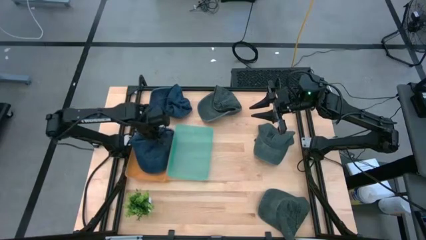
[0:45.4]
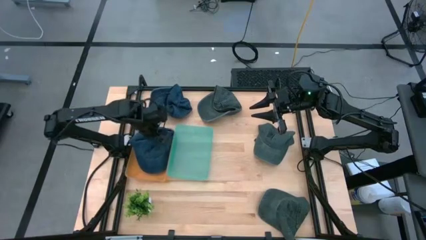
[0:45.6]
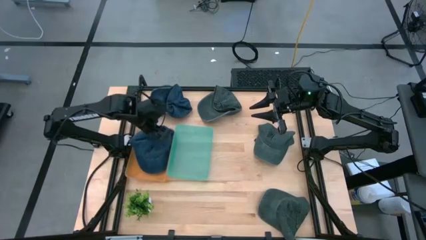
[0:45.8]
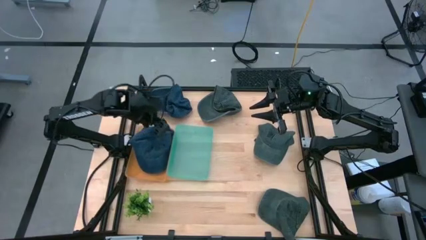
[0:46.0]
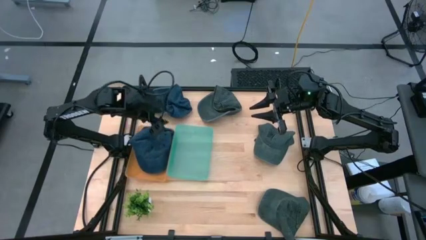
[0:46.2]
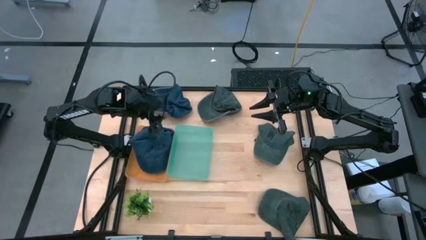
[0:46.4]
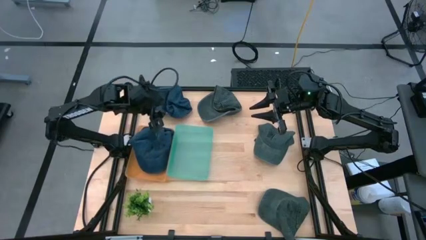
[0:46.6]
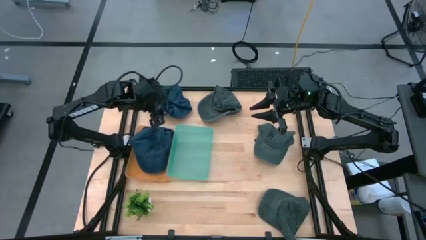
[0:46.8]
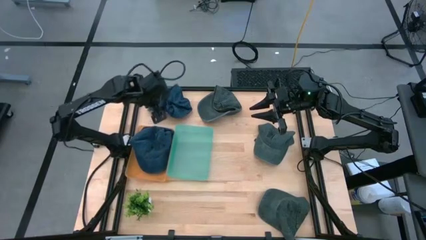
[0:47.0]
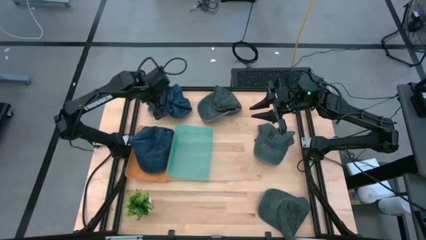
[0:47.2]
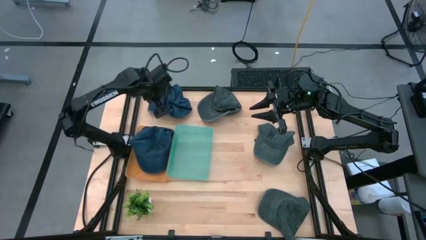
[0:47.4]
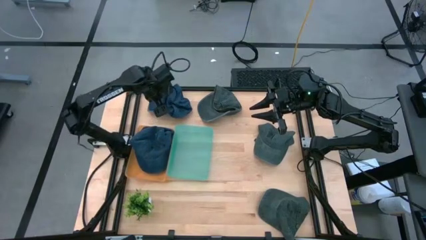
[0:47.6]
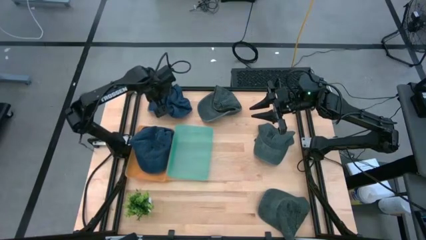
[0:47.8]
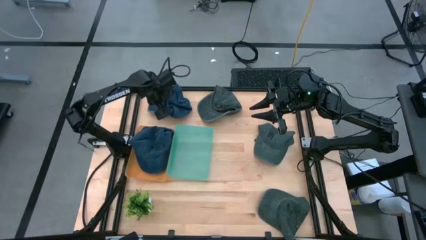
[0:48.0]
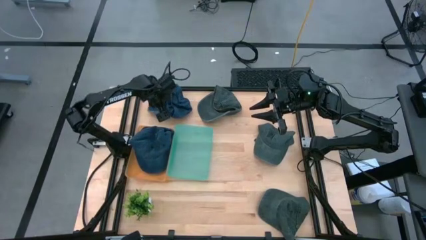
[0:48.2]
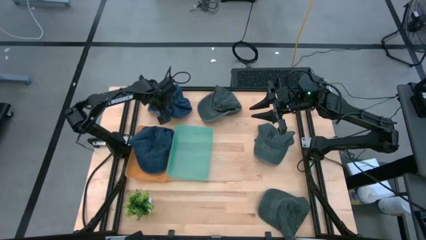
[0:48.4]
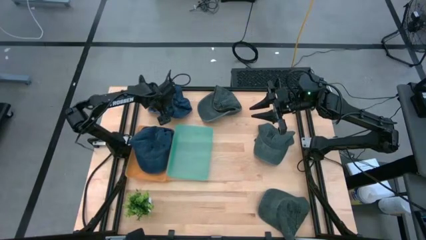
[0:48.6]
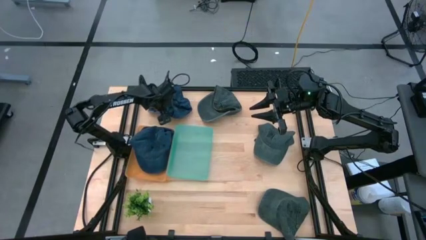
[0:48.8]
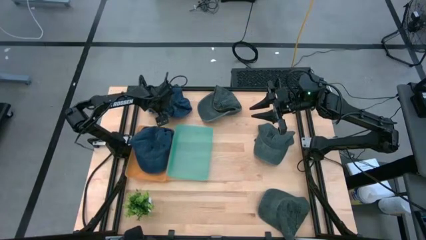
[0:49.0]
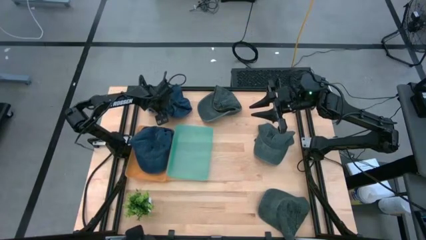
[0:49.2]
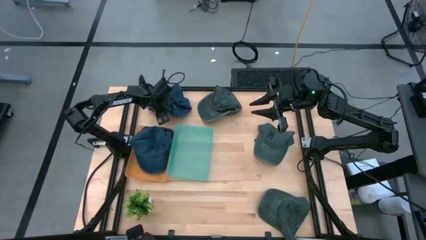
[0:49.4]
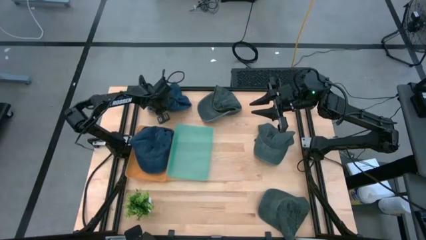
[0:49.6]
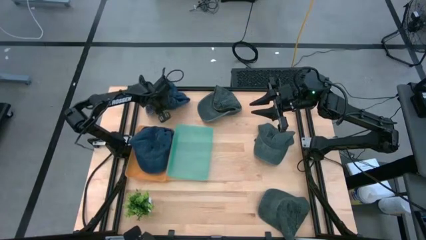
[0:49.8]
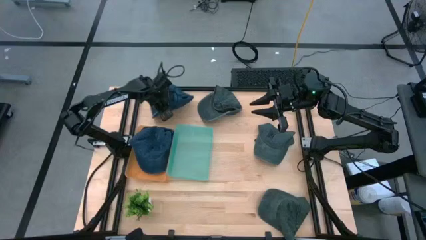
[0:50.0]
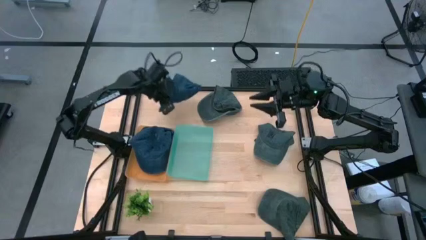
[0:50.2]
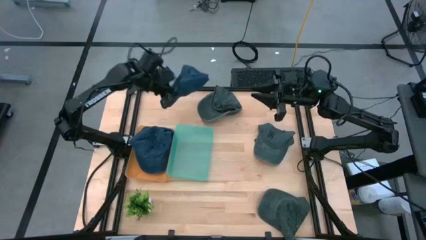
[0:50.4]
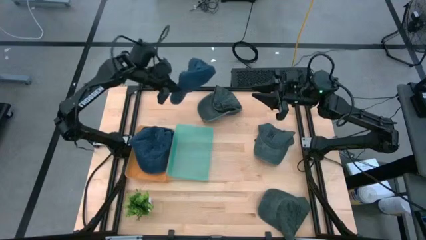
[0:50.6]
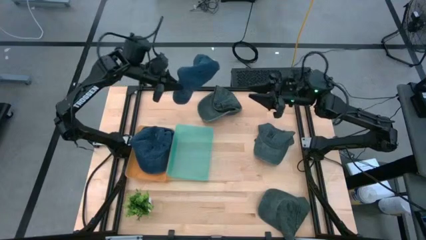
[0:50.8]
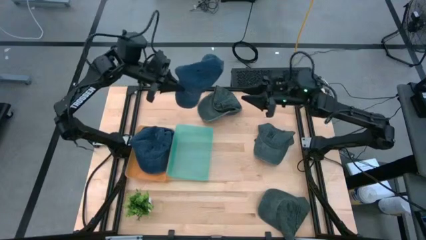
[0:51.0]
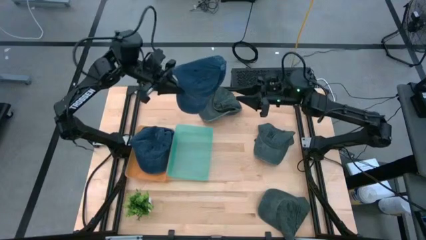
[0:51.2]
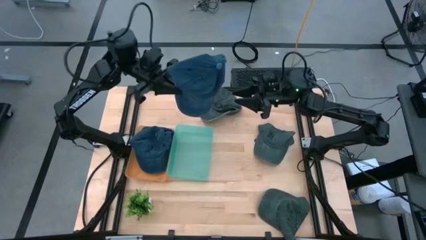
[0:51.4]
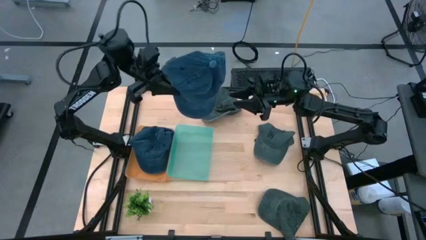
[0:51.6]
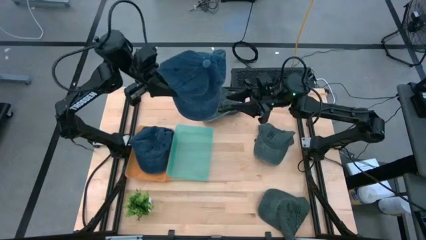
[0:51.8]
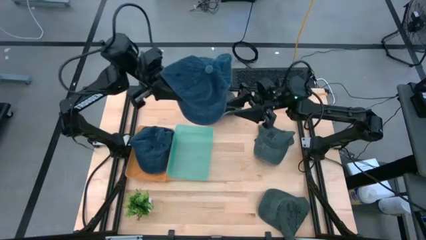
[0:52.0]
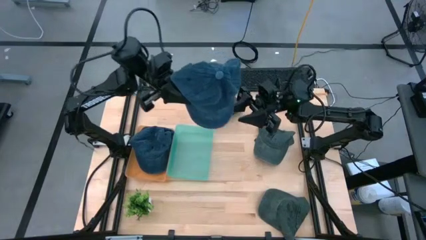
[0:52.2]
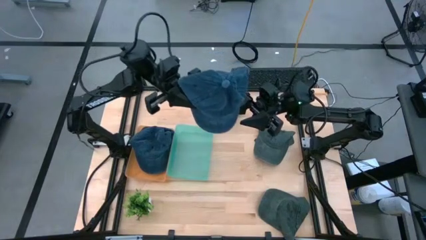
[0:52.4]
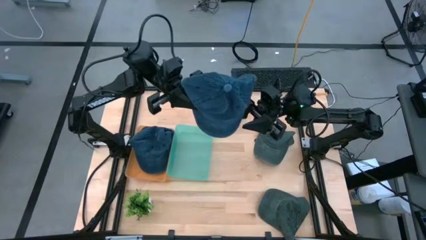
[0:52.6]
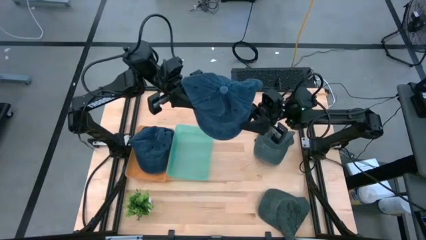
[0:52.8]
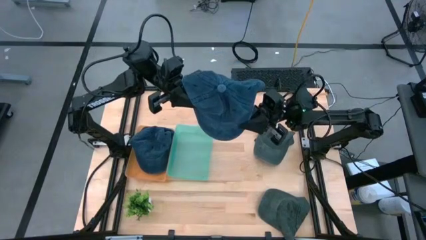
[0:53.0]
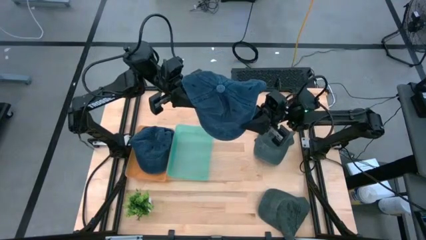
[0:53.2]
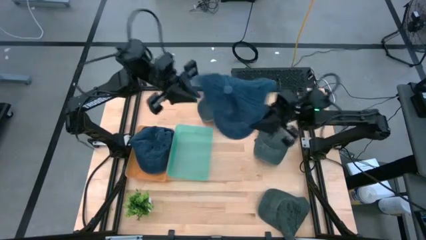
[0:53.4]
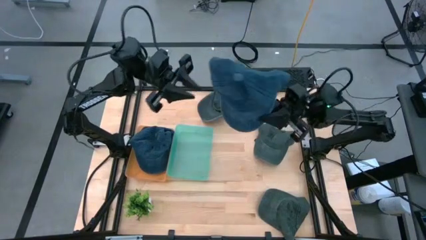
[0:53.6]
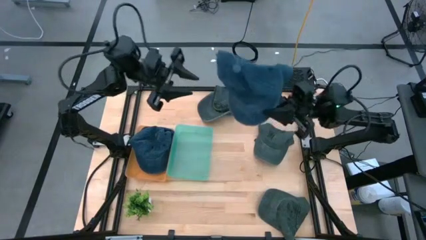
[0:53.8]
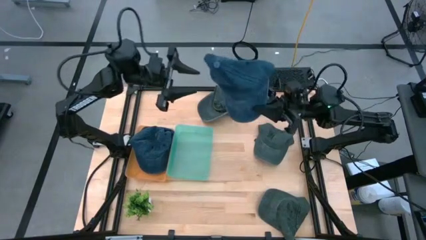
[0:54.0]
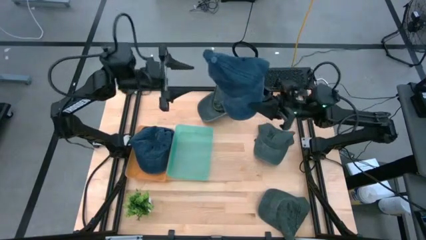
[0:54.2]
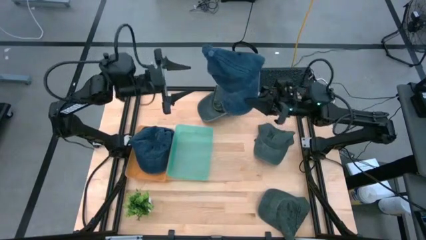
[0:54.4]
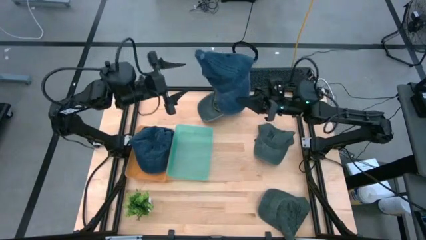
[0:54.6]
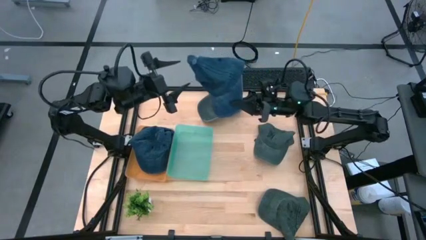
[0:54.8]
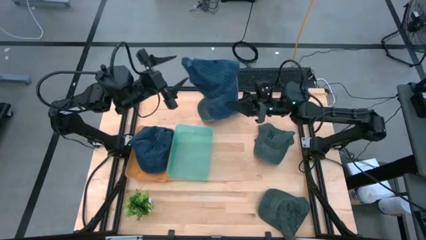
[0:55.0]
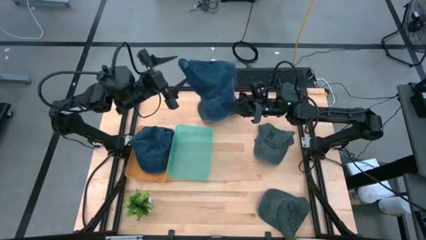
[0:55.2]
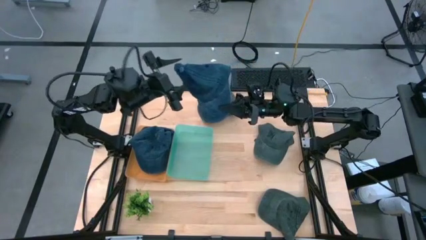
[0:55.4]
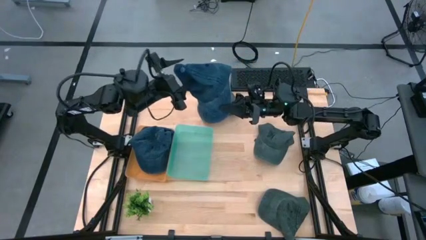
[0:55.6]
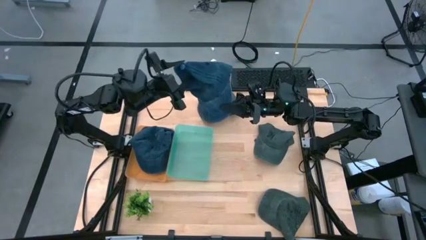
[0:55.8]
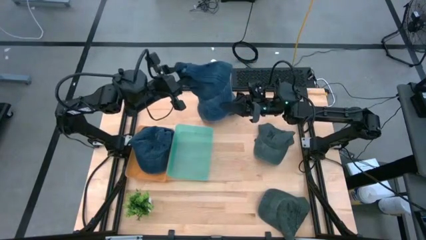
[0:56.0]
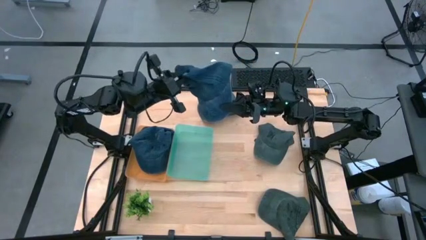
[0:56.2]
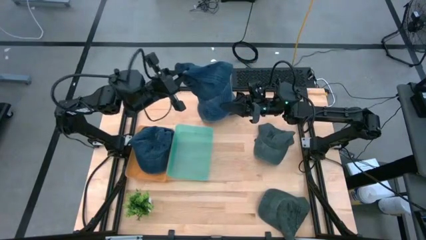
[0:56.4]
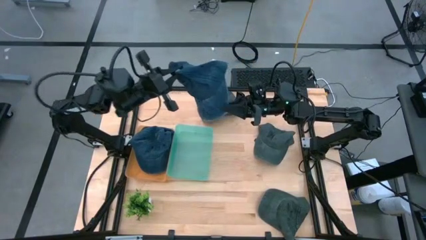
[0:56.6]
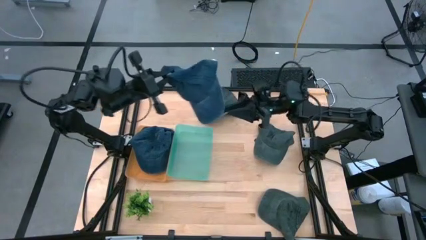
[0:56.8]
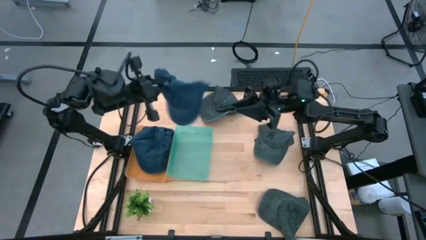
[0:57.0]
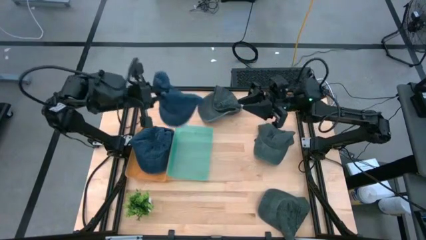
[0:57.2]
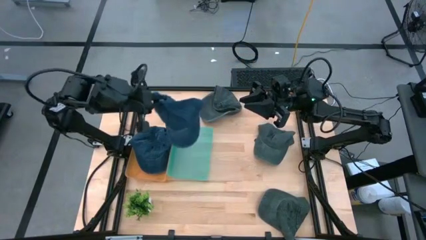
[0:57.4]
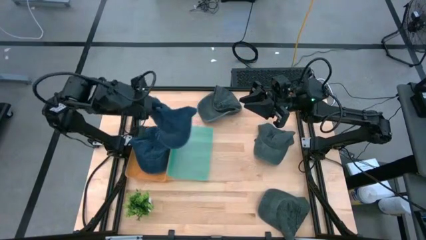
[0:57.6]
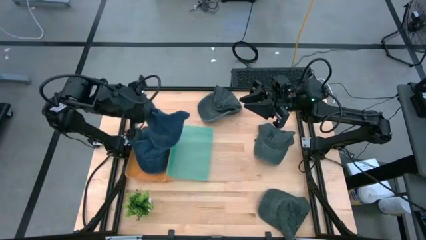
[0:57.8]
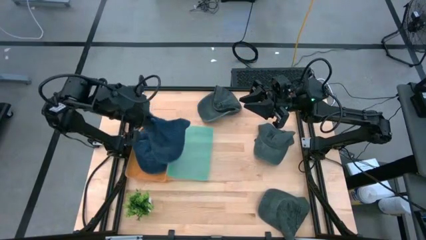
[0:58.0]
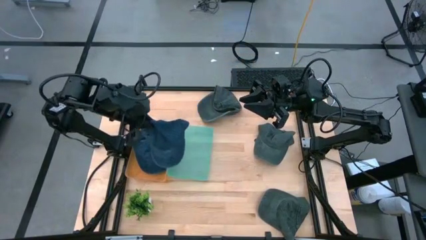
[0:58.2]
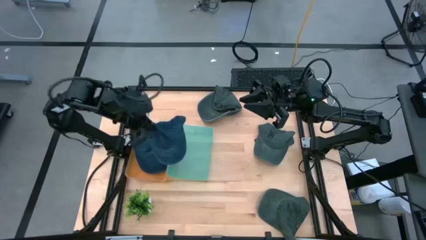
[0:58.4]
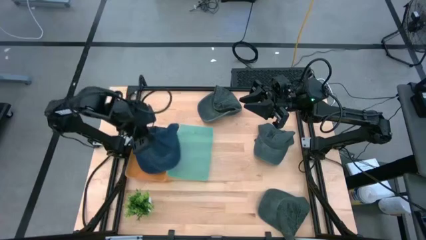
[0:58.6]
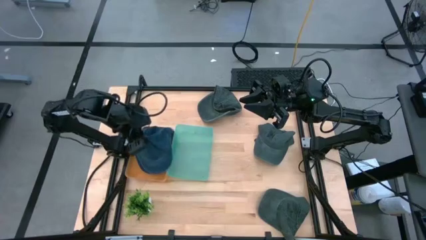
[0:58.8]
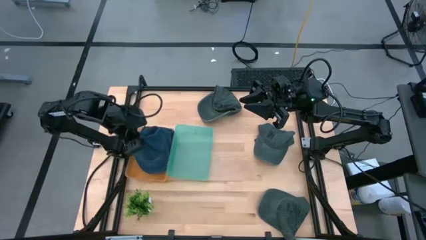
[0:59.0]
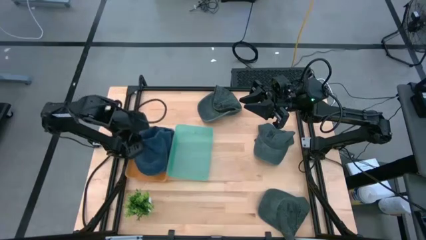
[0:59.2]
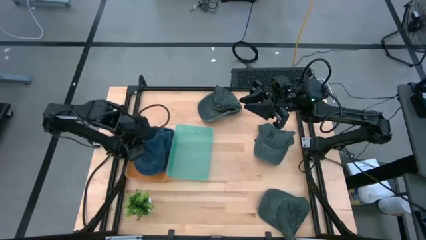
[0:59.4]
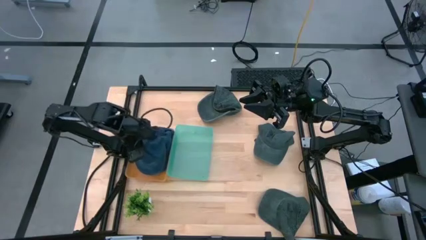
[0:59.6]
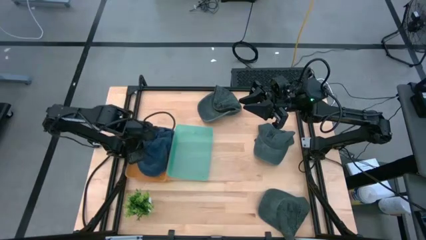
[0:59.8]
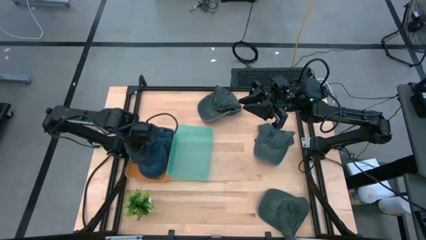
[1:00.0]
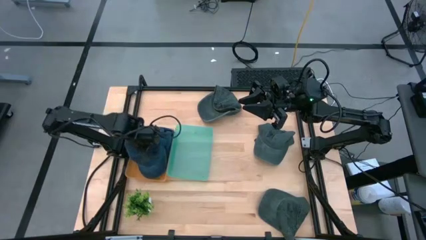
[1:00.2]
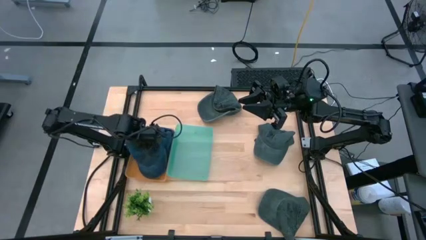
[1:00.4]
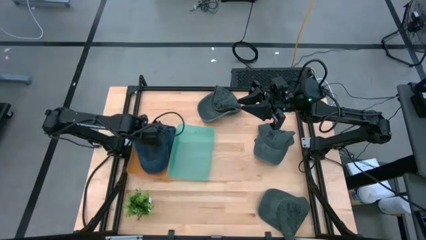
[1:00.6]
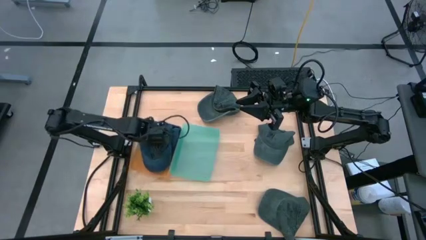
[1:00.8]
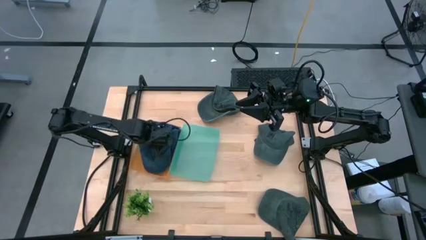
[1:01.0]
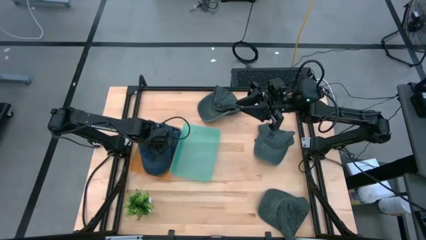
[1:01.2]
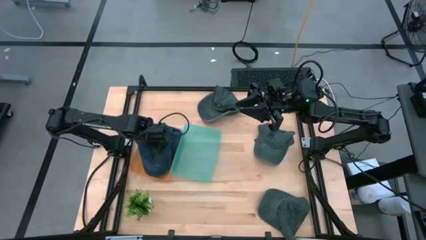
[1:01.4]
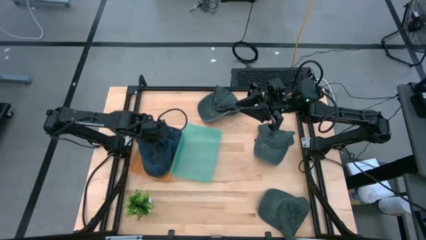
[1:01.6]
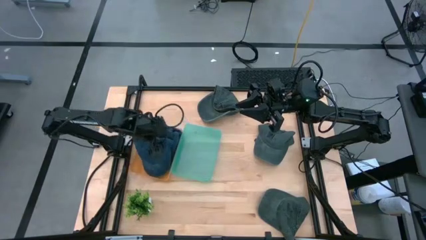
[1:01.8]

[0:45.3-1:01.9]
Task: Pick & Place hat
Put the blue cap into the orange bin
